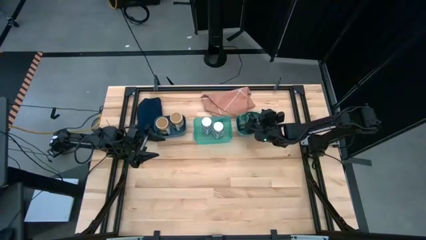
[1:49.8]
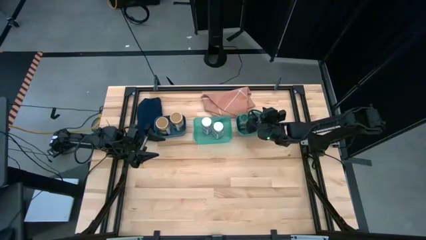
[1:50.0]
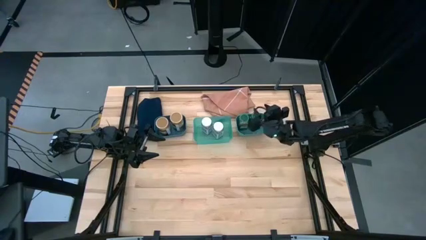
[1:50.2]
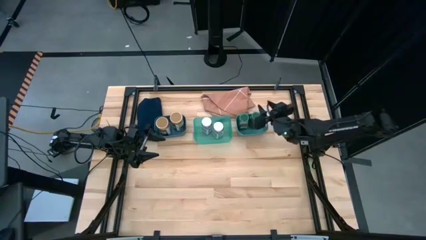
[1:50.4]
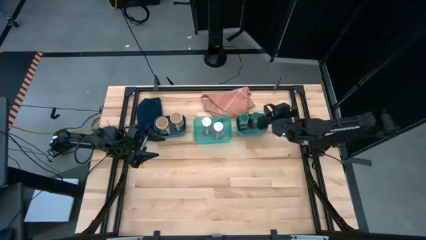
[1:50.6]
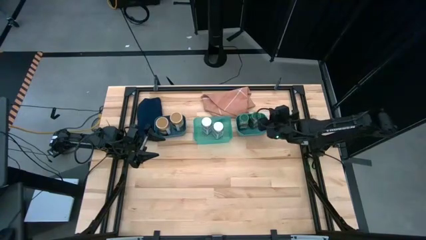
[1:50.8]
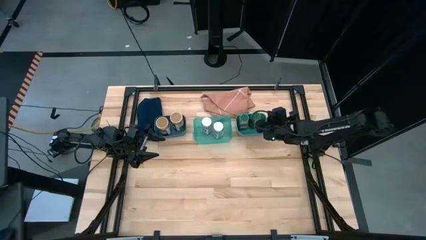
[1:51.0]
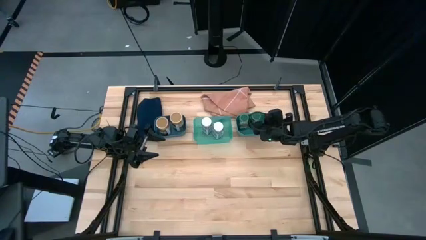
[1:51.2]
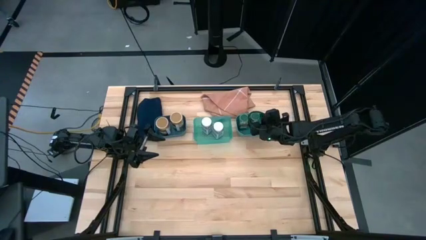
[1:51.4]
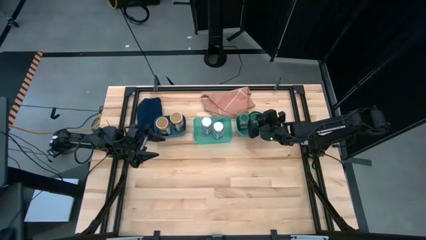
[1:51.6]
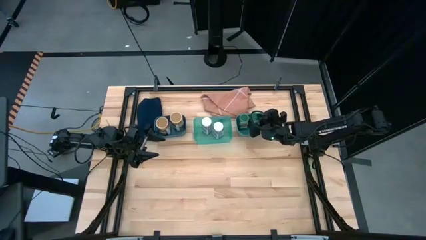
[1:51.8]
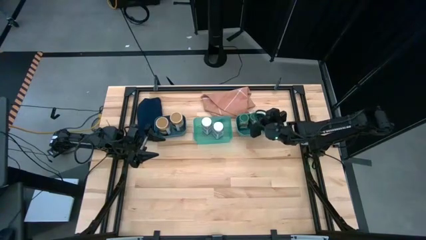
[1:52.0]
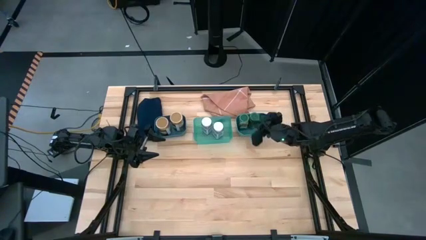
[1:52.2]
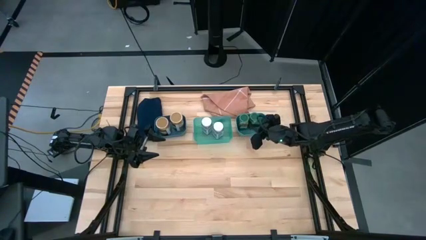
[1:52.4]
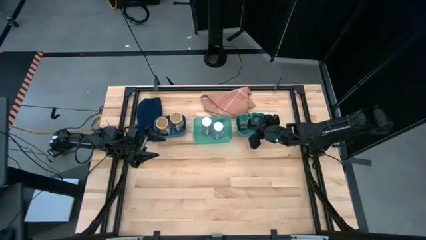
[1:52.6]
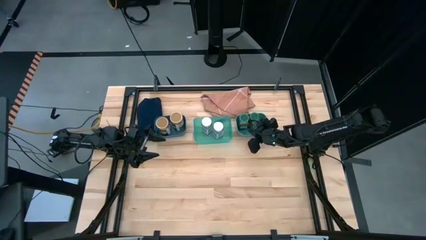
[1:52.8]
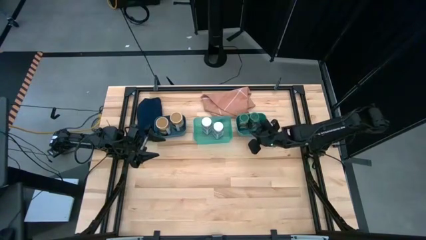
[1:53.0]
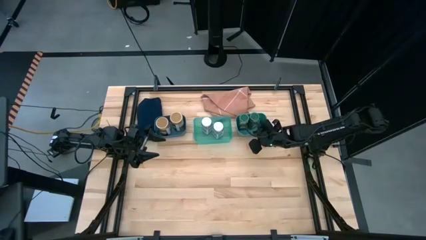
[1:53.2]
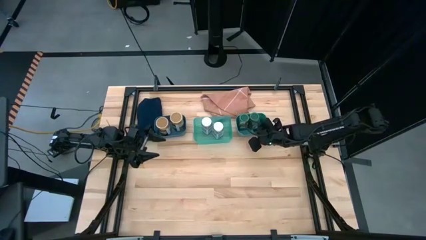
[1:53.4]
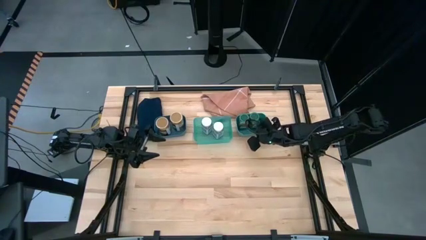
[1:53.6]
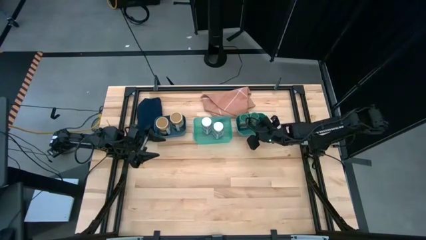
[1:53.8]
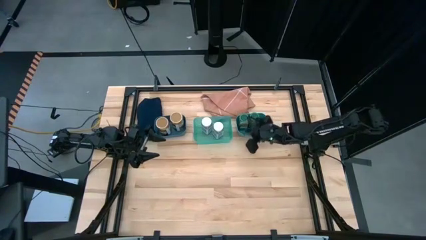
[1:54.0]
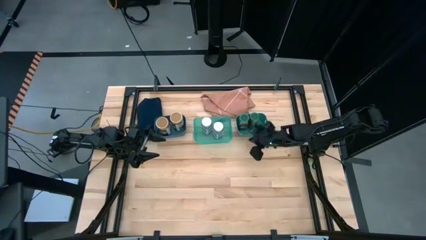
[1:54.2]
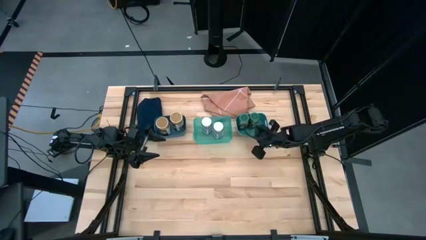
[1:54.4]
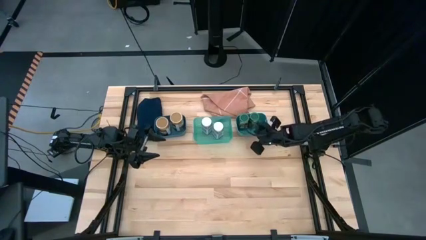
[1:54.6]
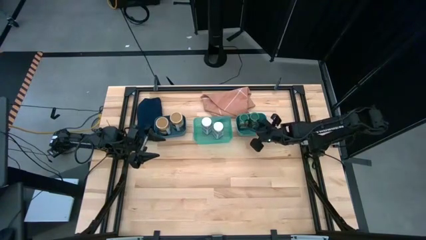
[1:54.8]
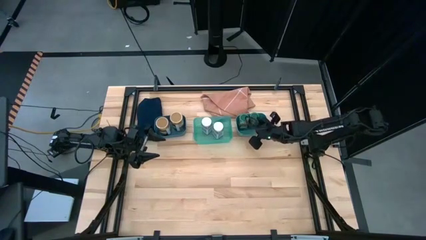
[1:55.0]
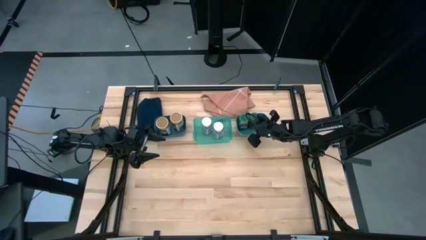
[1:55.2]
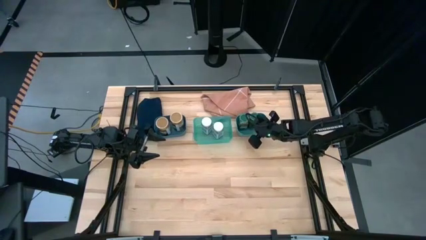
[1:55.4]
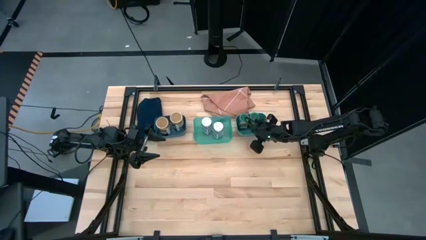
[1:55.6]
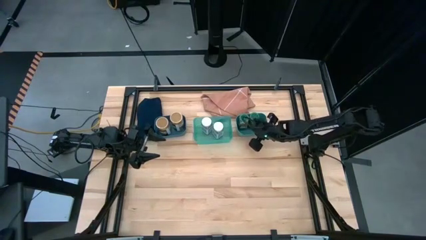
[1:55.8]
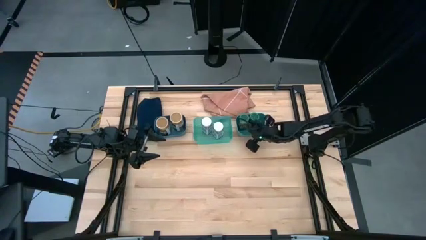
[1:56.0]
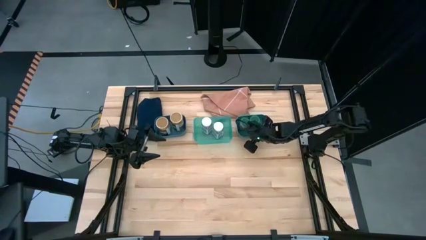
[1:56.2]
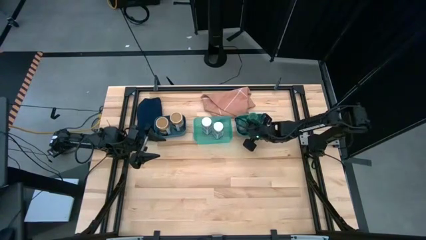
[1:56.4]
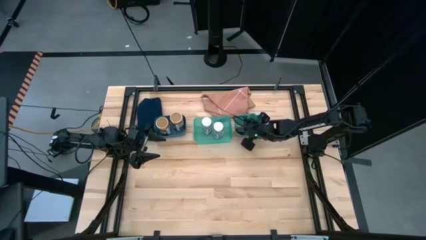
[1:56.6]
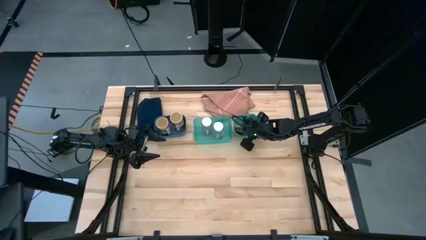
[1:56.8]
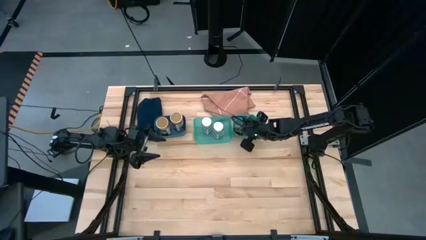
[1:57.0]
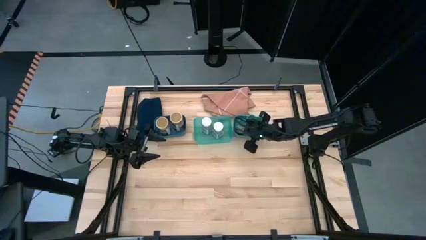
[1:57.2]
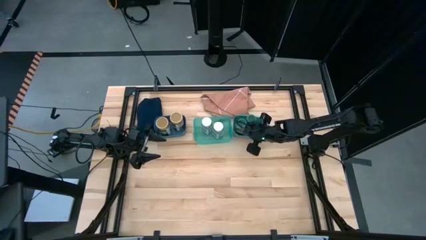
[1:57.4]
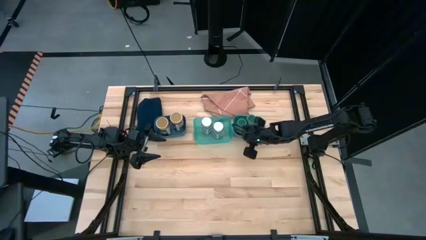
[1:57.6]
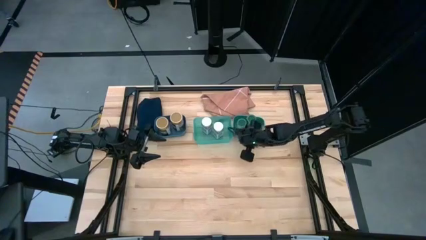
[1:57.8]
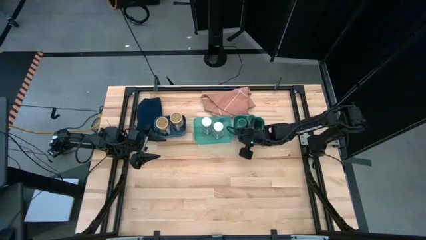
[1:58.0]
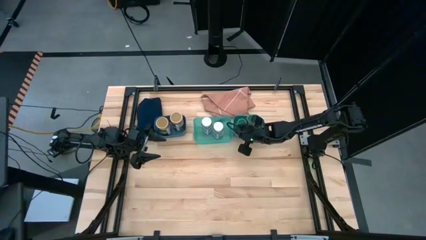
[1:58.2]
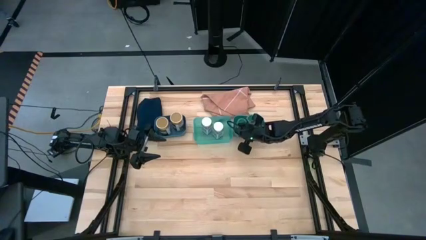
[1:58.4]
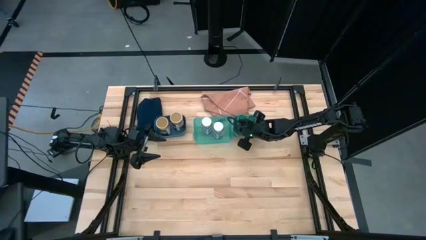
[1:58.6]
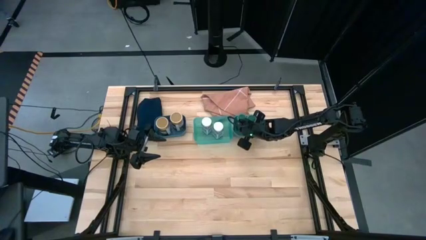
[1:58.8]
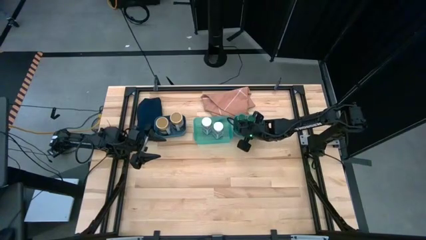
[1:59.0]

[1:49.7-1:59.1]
Task: Sort spices by type
Adjust the green seasoning bottles and the bin

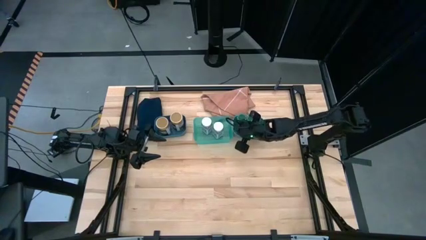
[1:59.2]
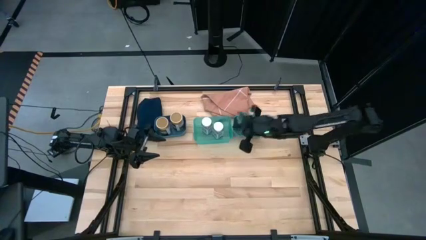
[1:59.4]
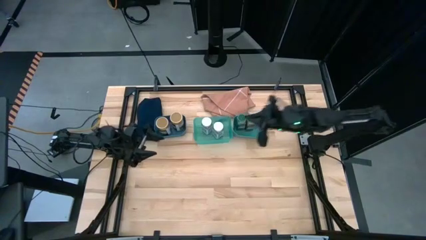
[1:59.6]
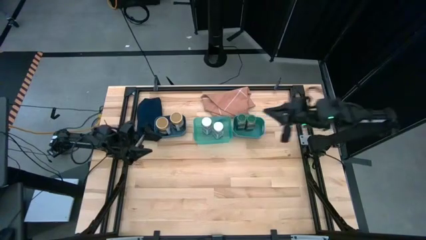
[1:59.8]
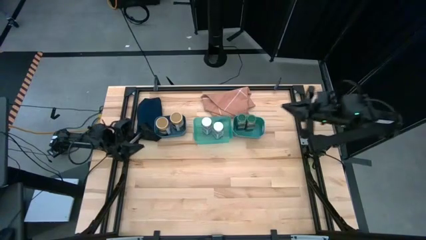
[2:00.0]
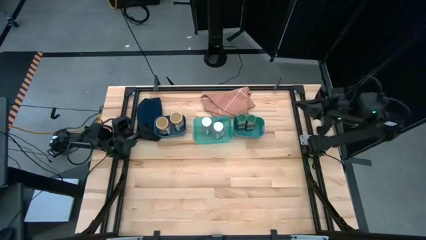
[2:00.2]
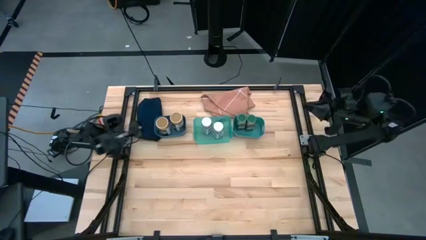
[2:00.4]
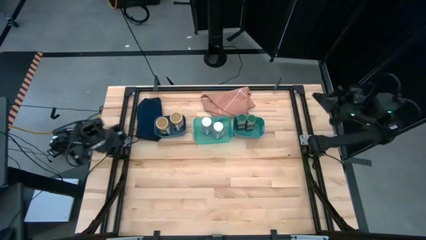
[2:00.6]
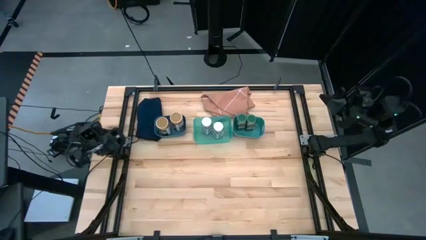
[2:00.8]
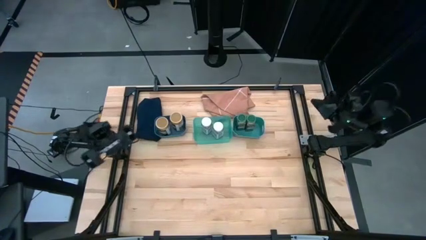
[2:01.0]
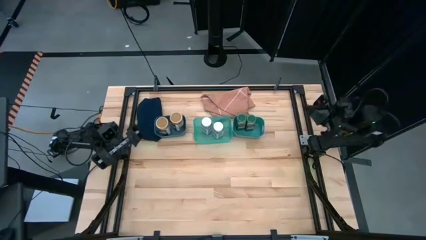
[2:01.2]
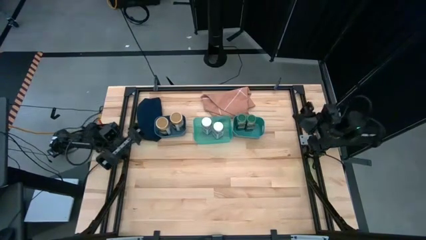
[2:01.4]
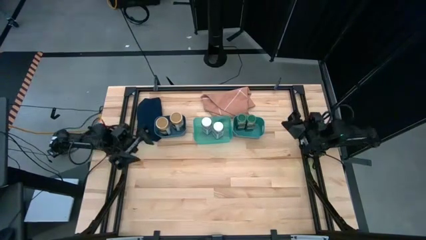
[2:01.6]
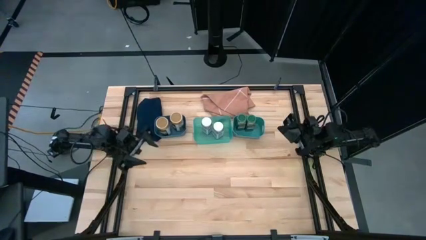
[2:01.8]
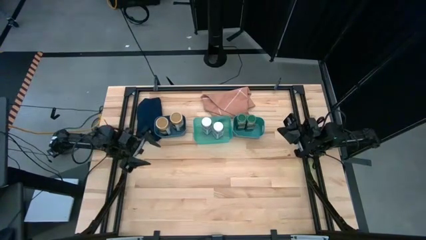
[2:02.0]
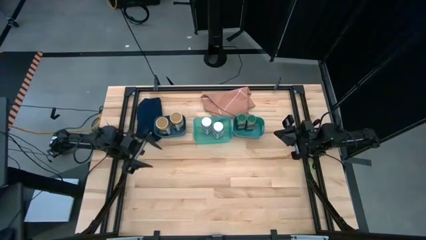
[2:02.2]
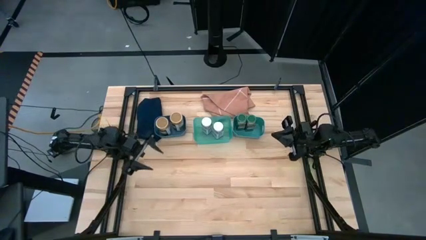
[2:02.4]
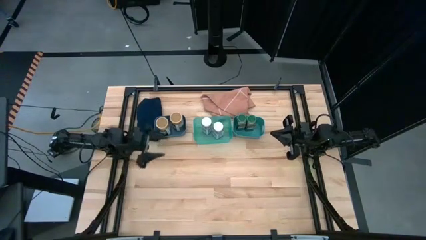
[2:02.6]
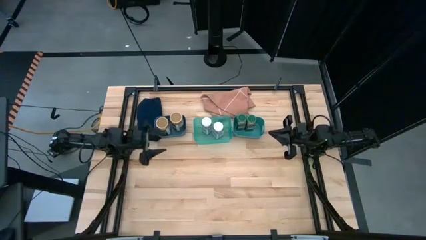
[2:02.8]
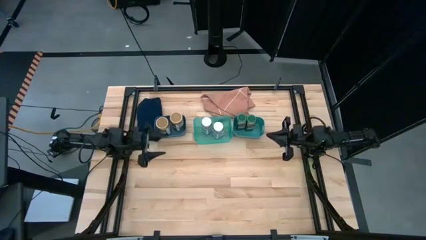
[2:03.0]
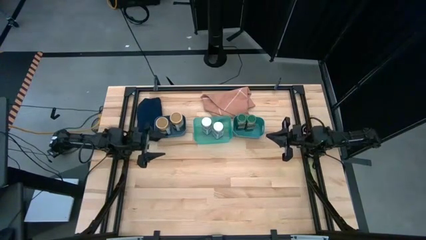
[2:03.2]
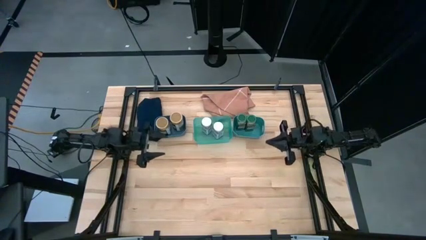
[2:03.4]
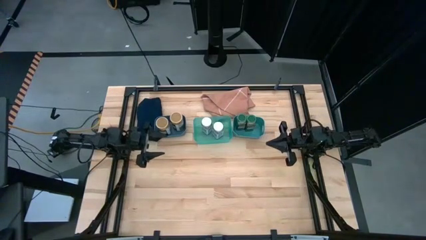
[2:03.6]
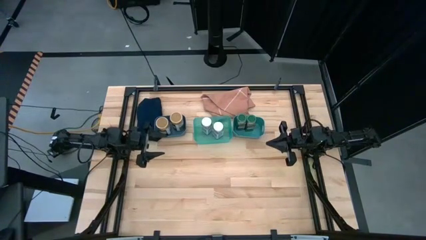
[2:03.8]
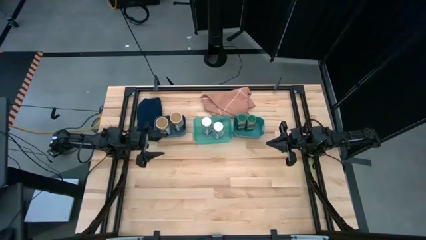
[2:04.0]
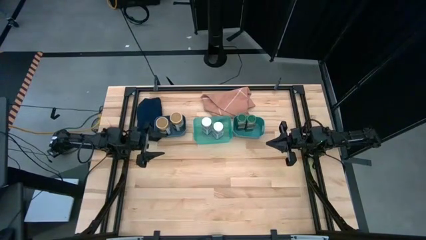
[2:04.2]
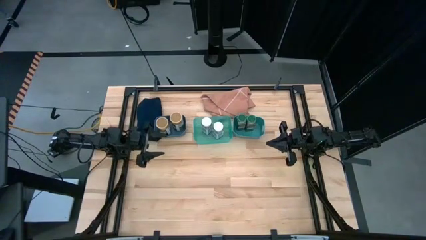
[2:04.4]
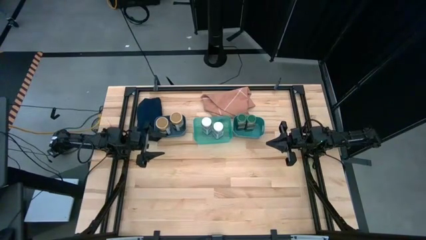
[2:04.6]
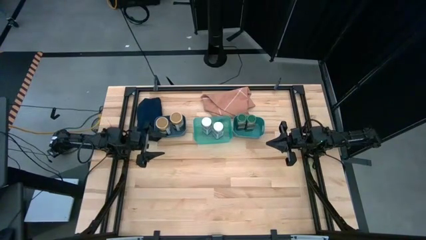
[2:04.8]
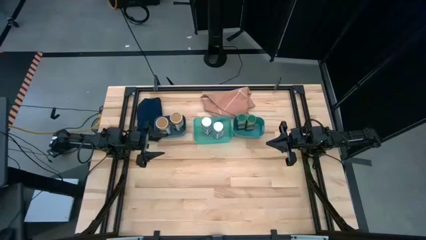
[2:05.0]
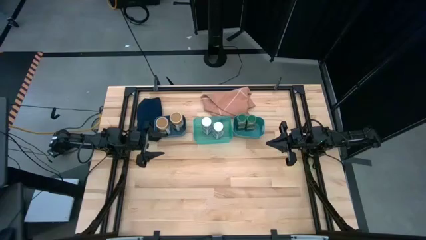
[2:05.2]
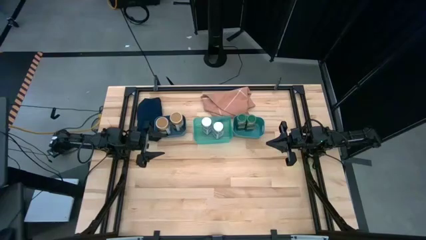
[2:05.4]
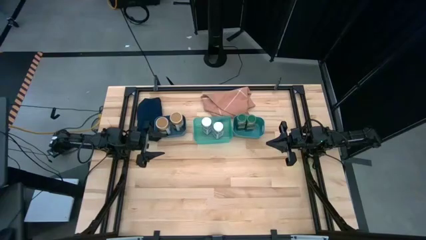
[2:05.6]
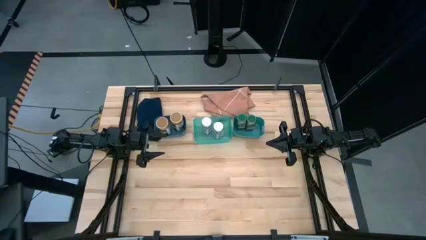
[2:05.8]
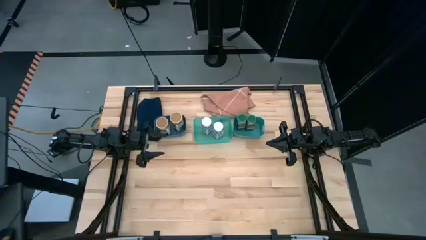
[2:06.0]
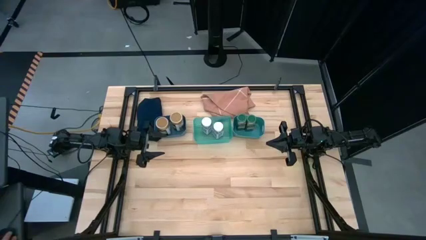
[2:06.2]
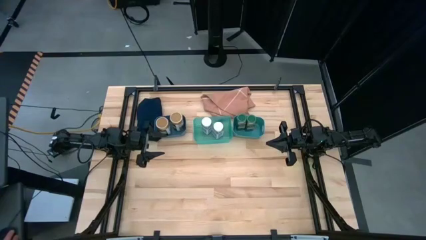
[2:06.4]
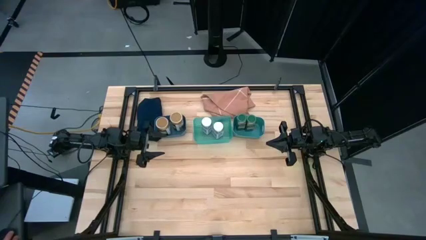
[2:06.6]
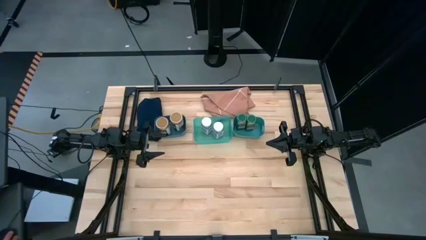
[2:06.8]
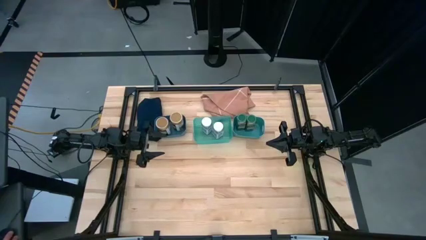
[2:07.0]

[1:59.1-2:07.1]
Return to Home Position
